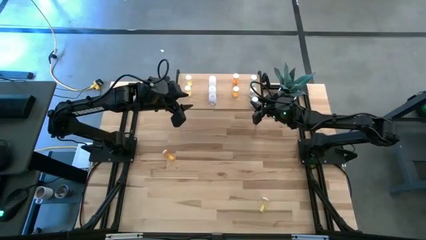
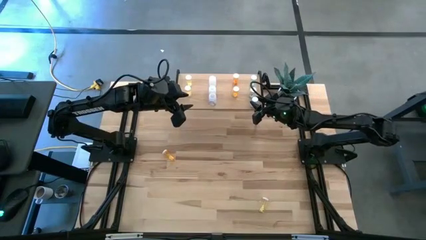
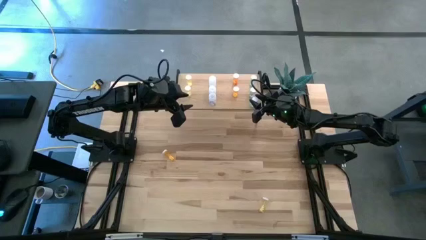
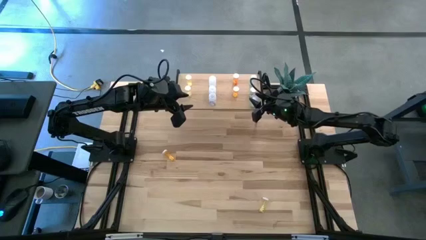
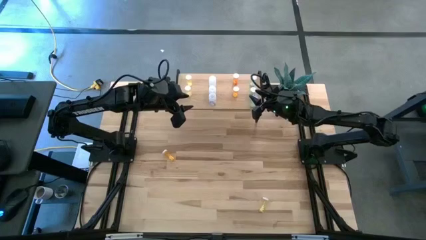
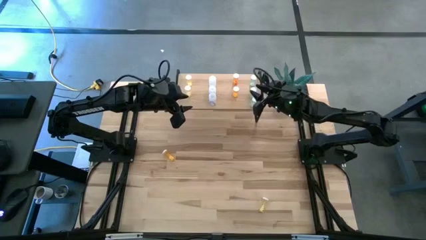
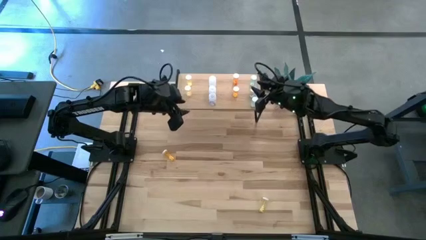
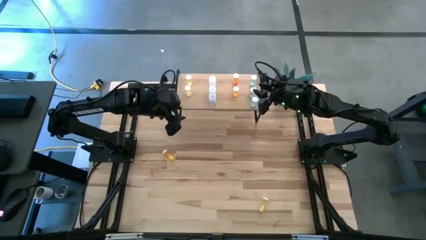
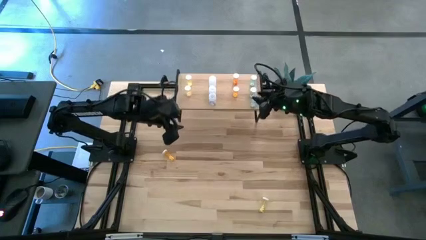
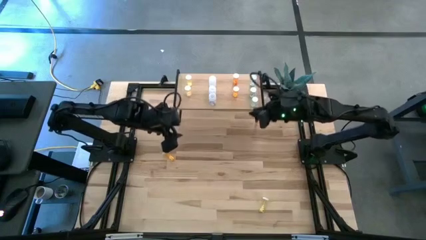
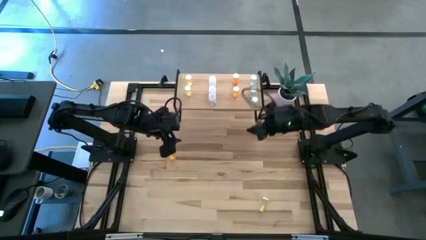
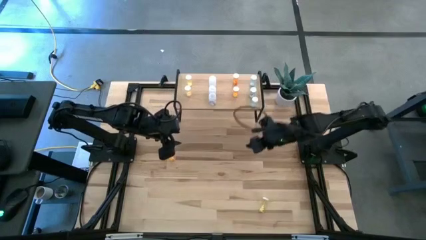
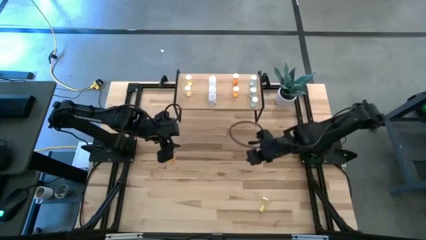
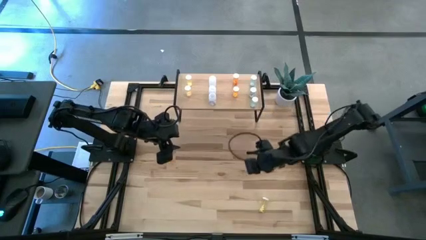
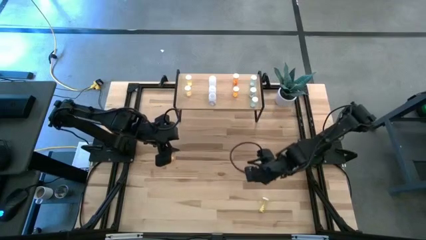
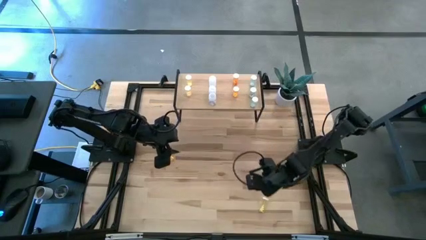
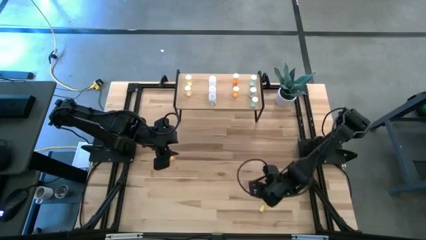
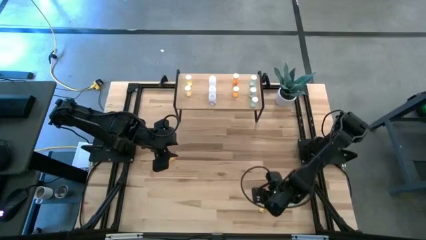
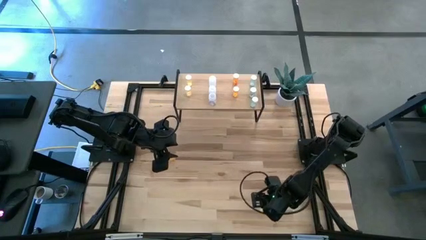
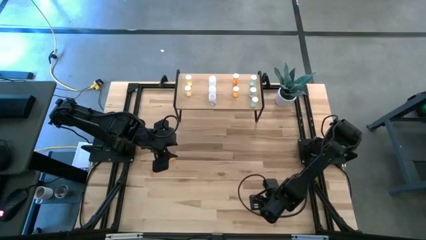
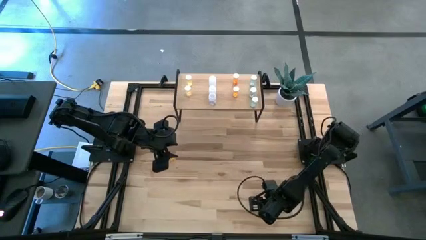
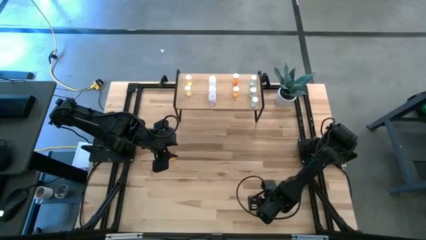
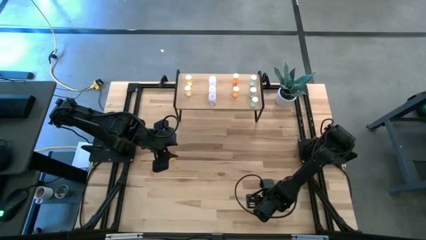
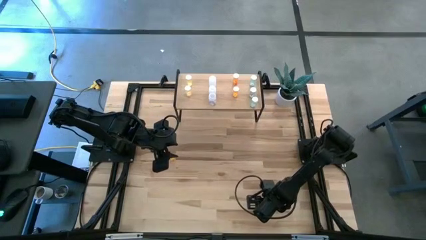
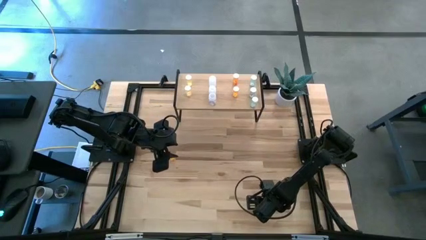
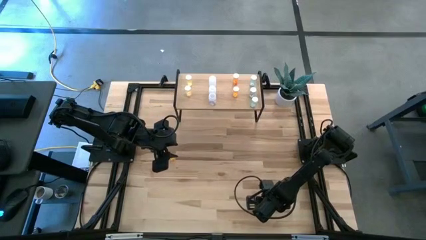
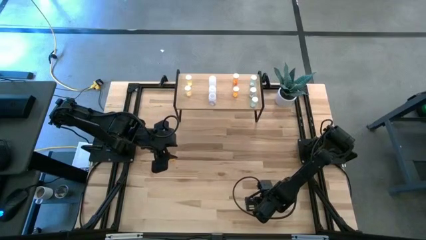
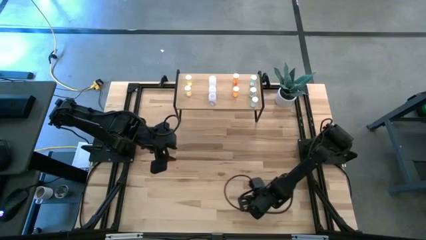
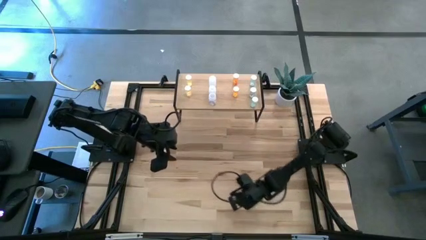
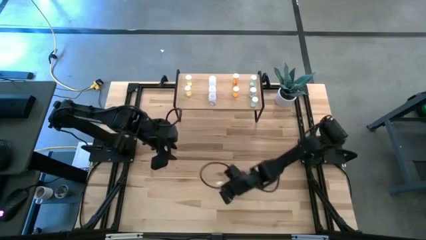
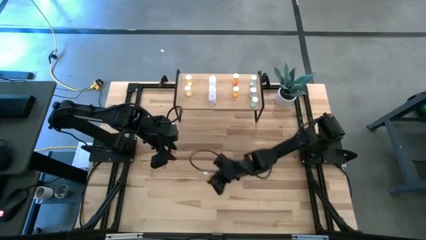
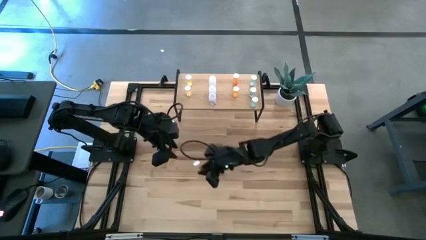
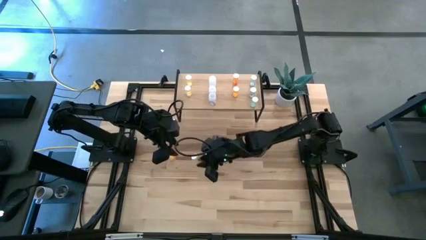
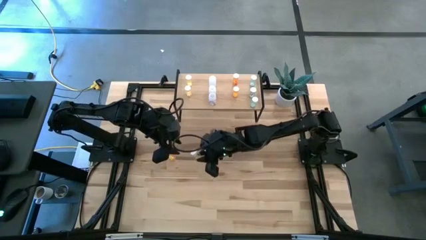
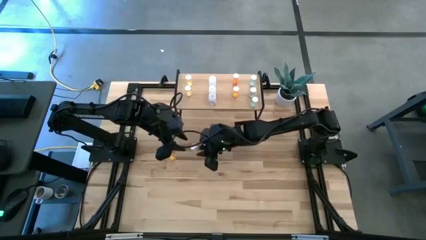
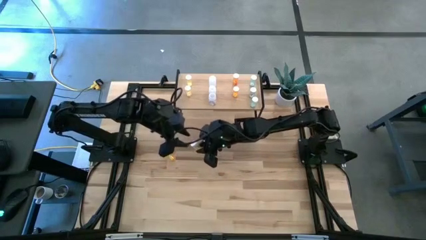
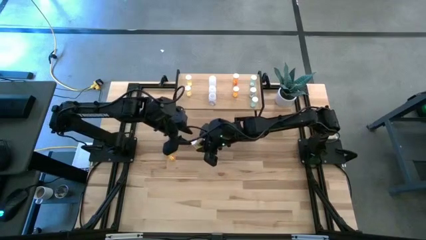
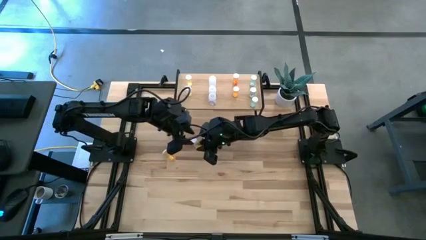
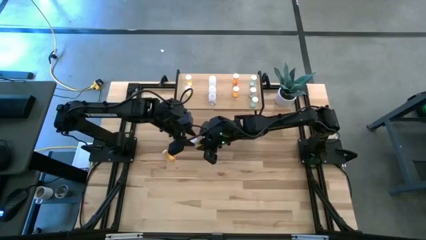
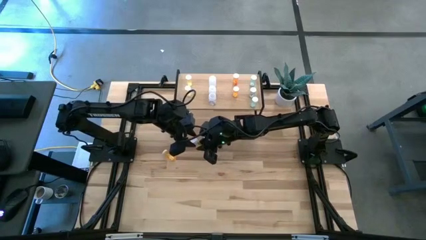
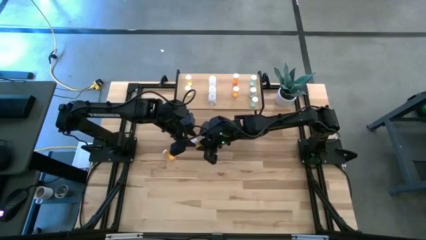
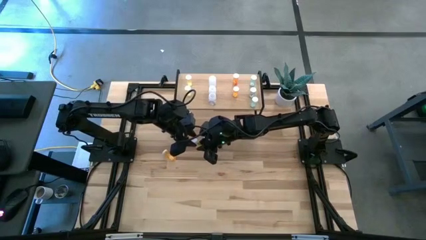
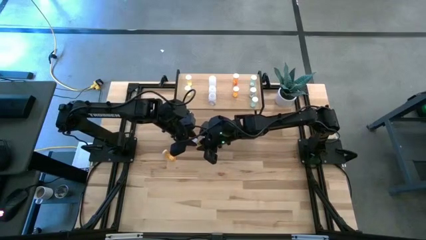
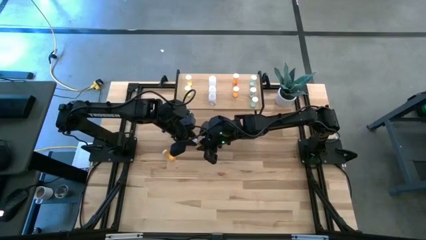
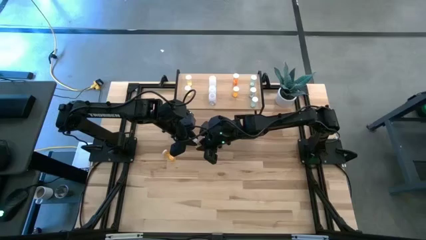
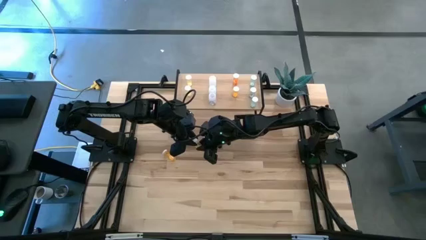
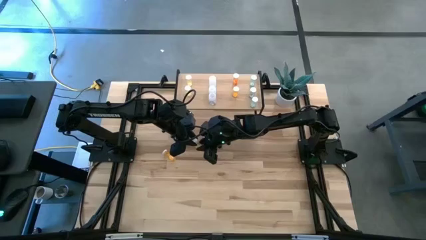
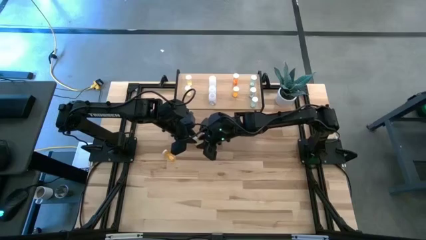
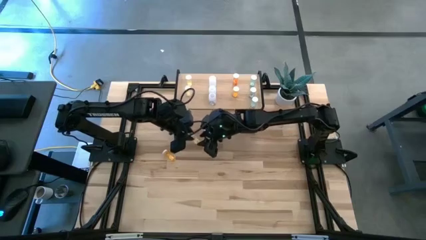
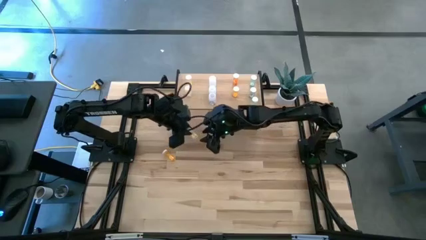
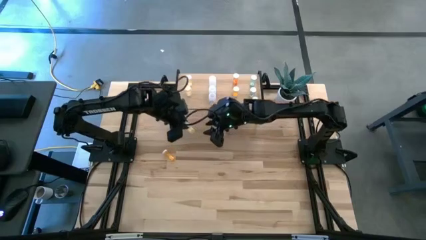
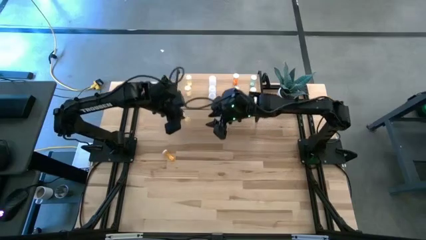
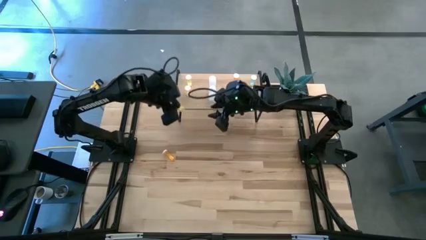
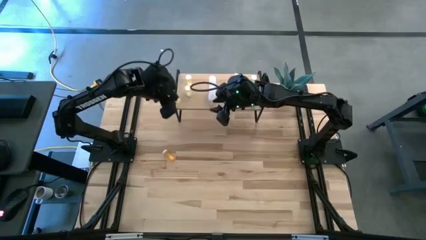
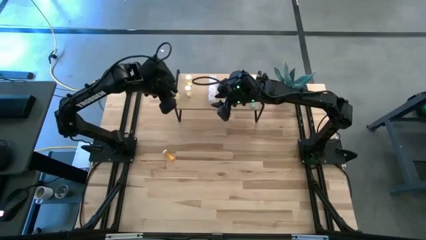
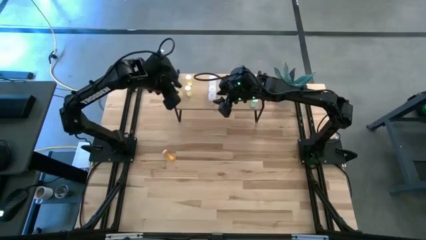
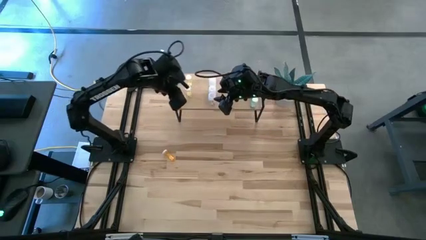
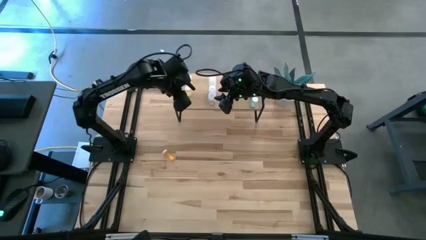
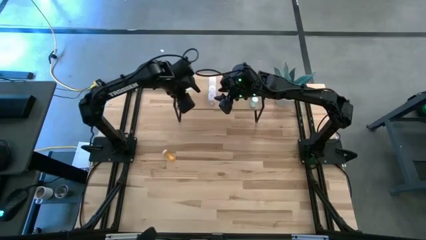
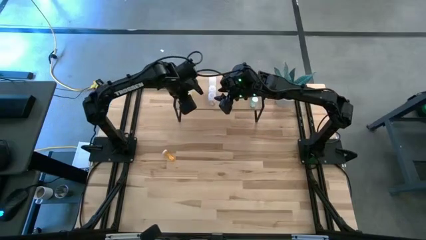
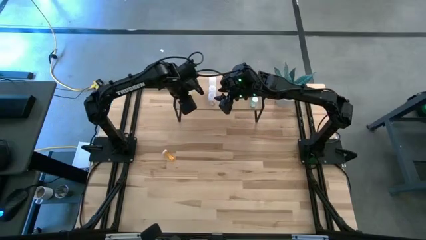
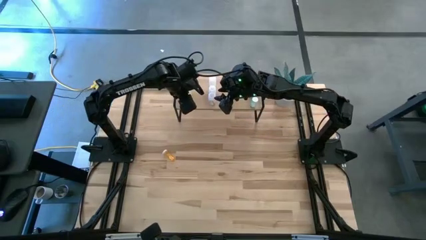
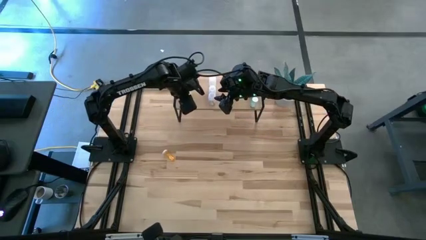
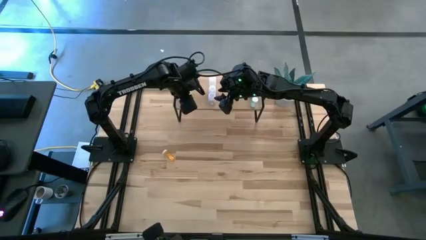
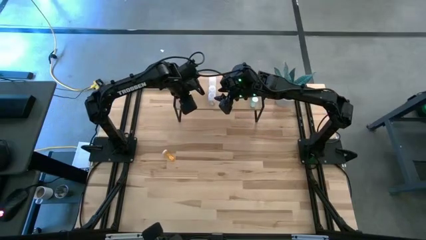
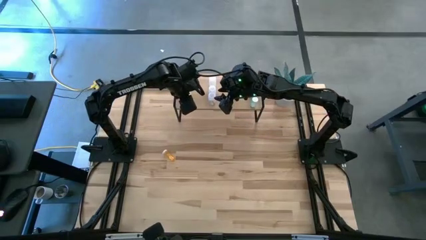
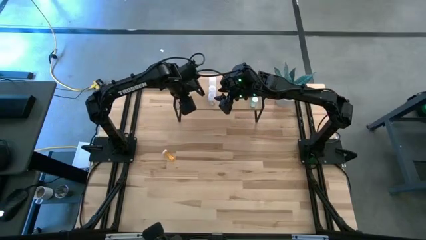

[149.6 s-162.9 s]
Task: Pick and place medicine bottles onto shelf by color
Put the yellow medicine bottle on the shelf aligned with the other yellow medicine bottles

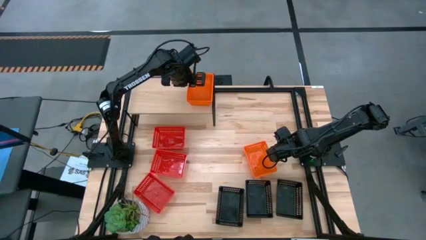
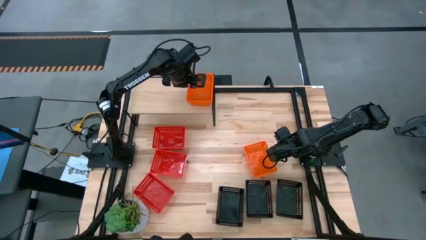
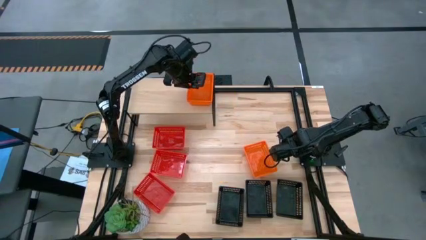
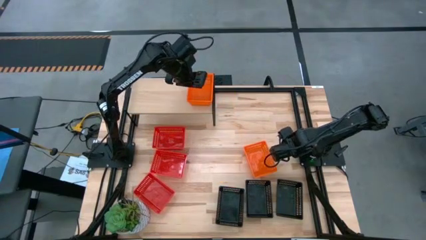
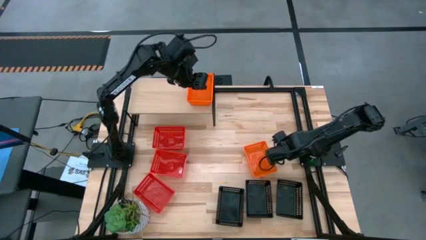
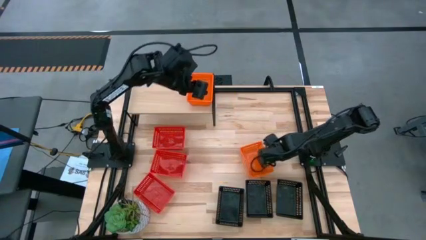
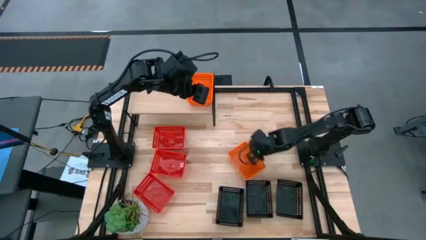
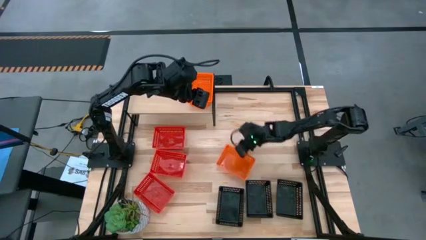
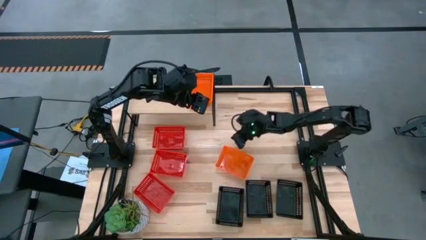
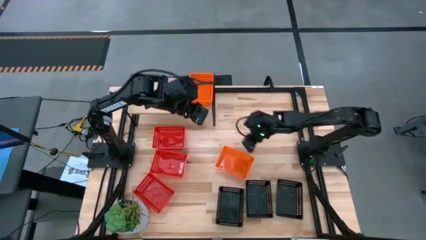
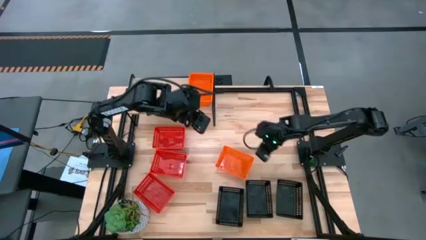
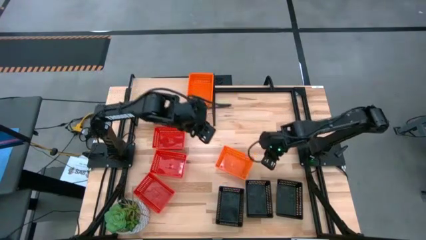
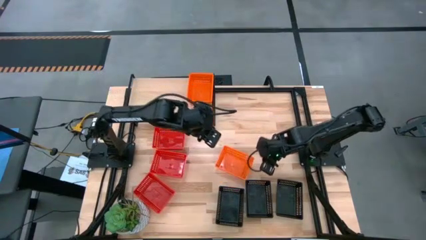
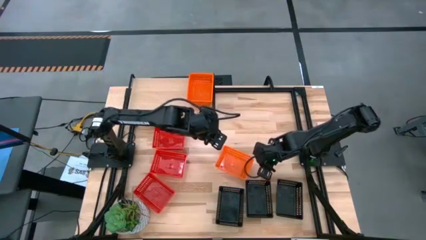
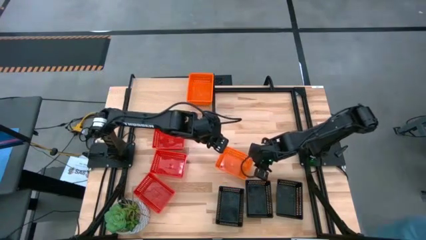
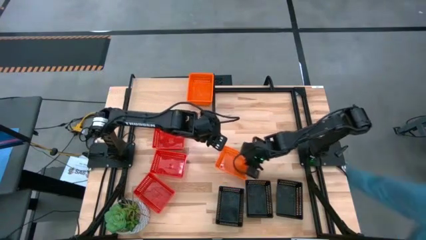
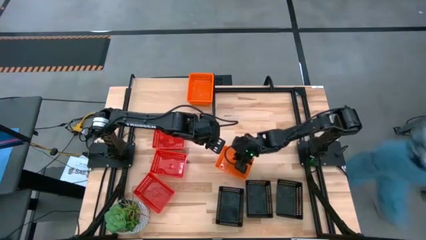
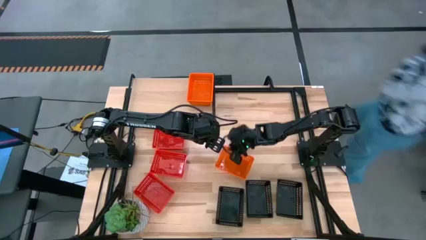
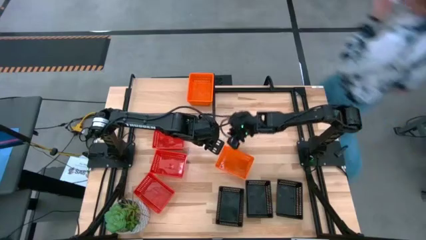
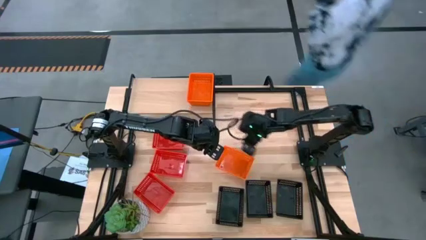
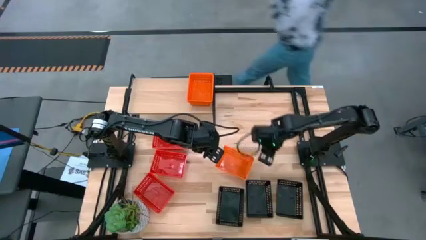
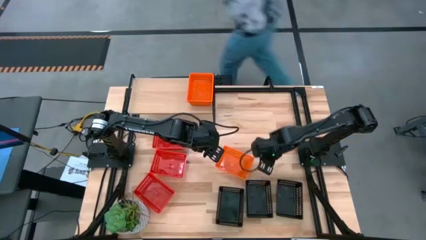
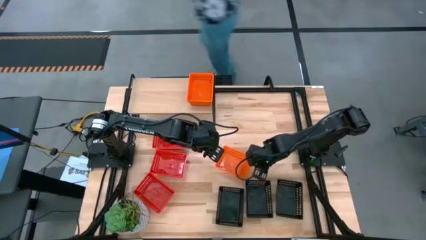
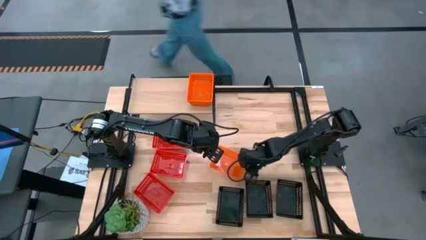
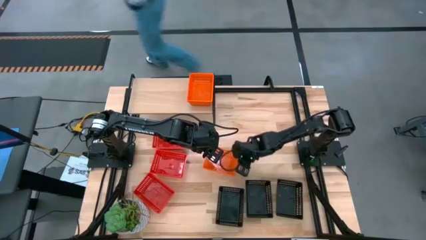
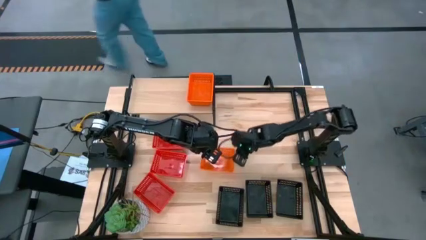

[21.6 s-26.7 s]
Task: Stack baskets on shelf by color
Adjust the orange bin
